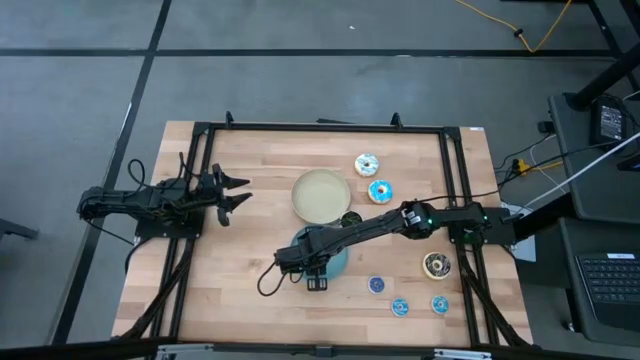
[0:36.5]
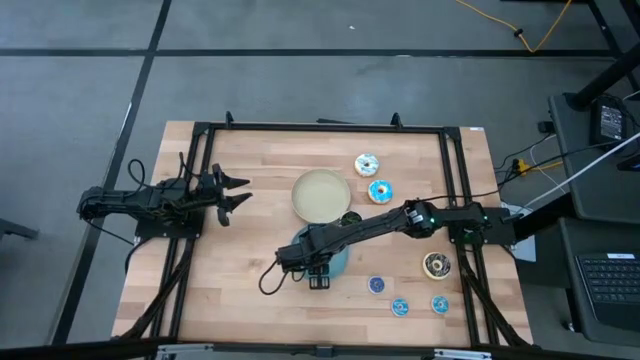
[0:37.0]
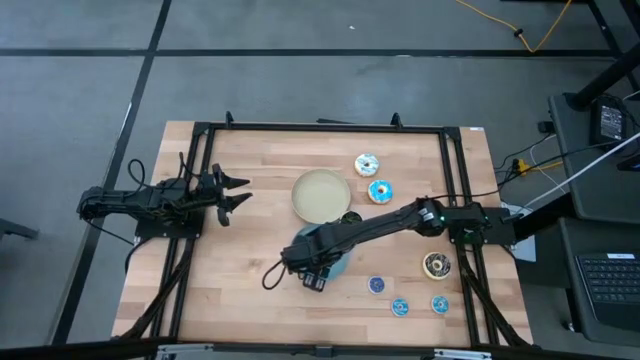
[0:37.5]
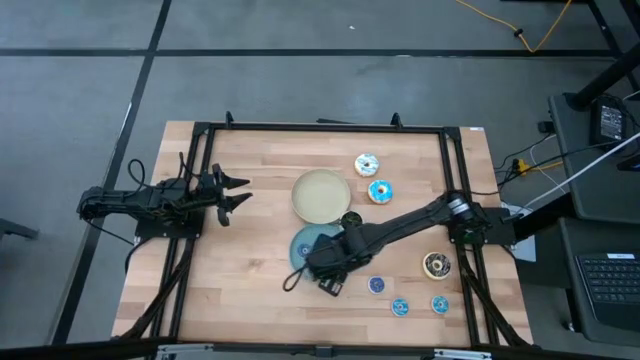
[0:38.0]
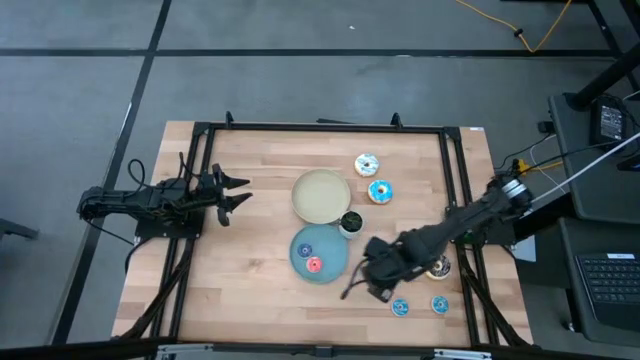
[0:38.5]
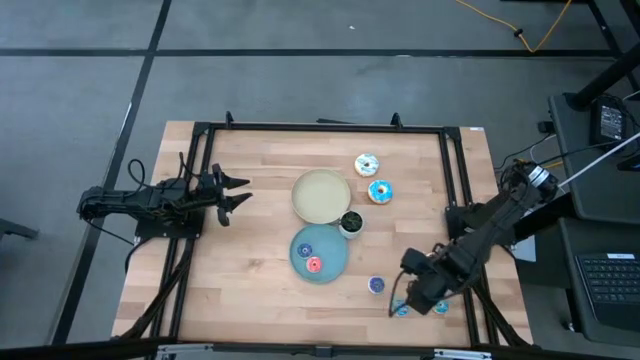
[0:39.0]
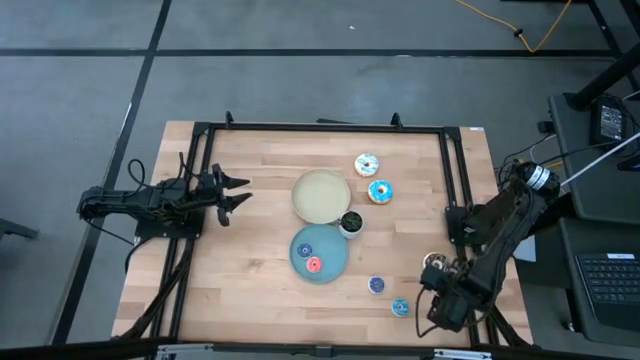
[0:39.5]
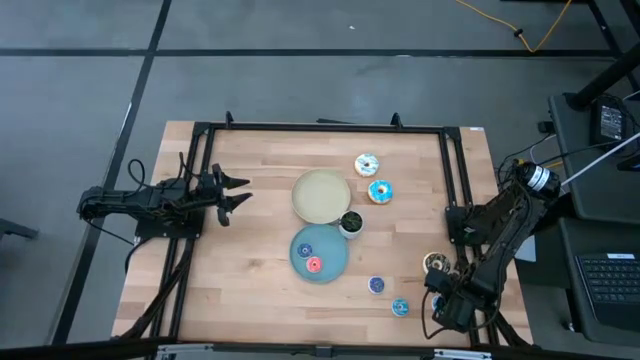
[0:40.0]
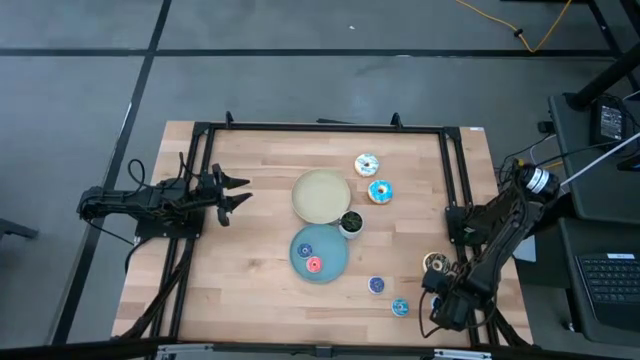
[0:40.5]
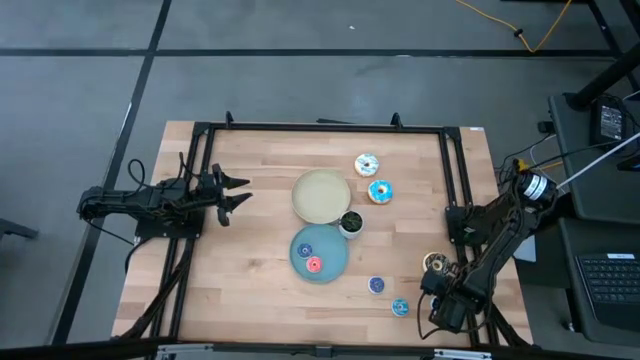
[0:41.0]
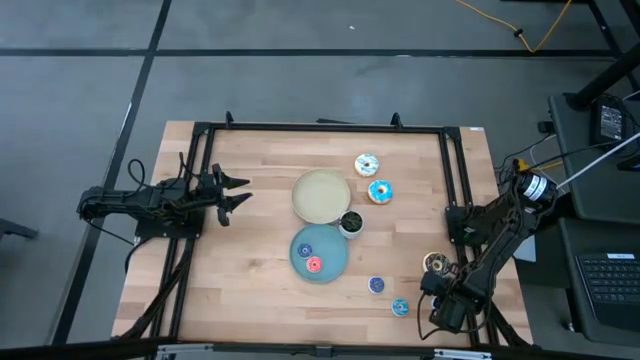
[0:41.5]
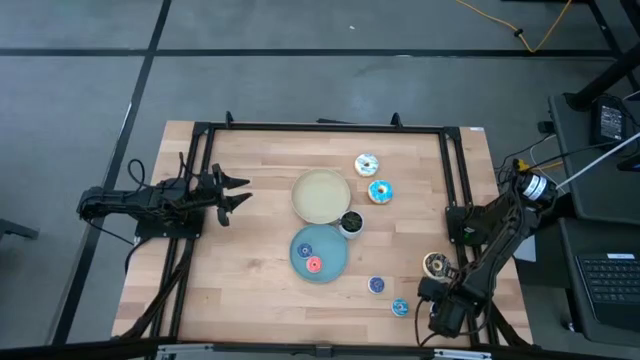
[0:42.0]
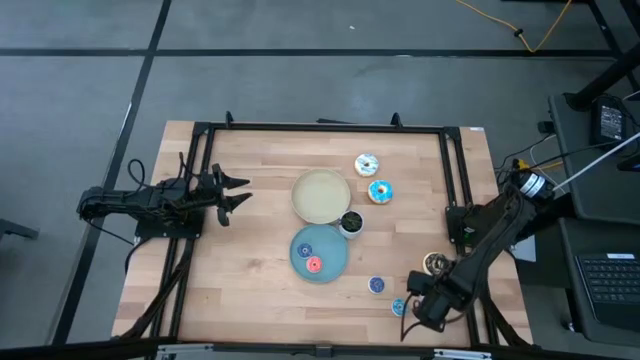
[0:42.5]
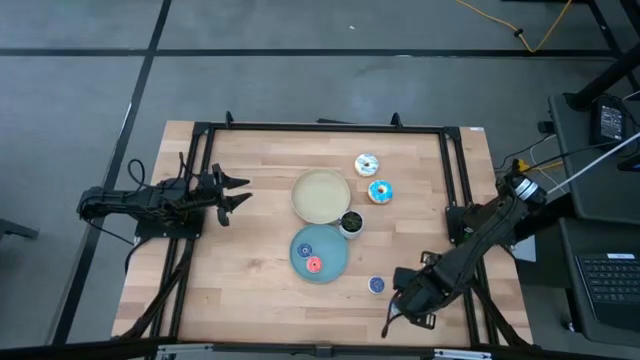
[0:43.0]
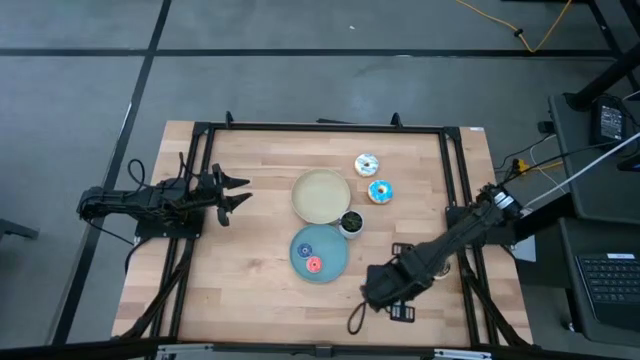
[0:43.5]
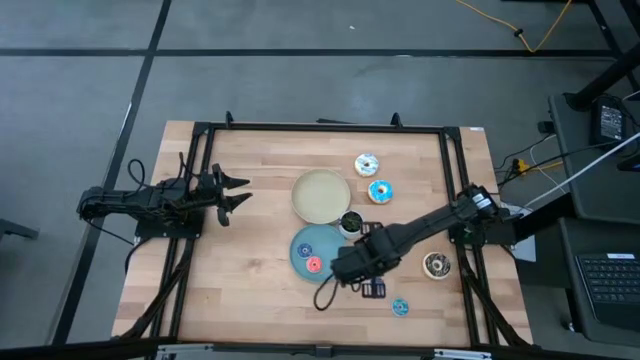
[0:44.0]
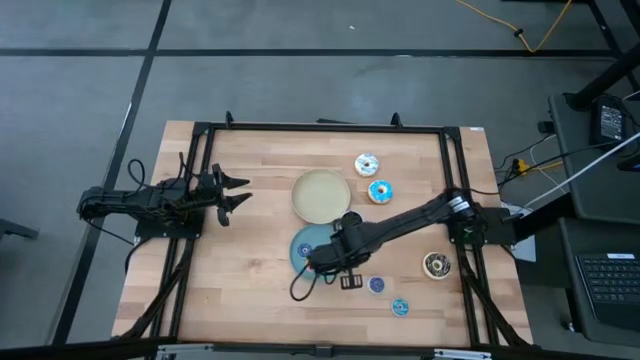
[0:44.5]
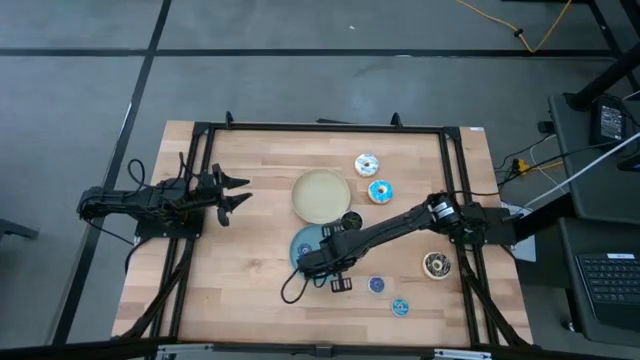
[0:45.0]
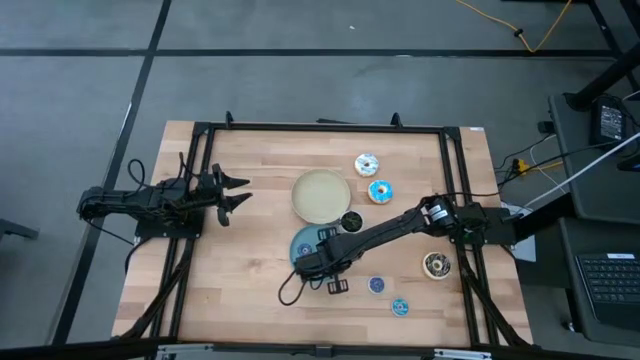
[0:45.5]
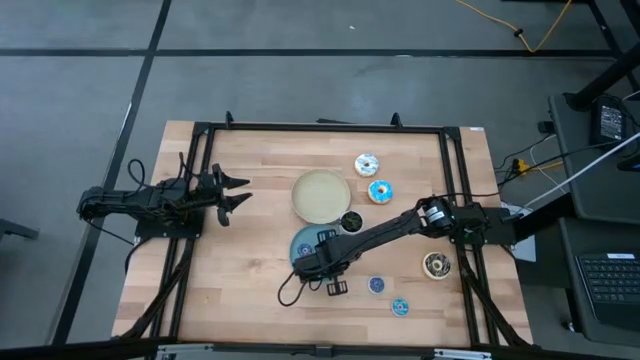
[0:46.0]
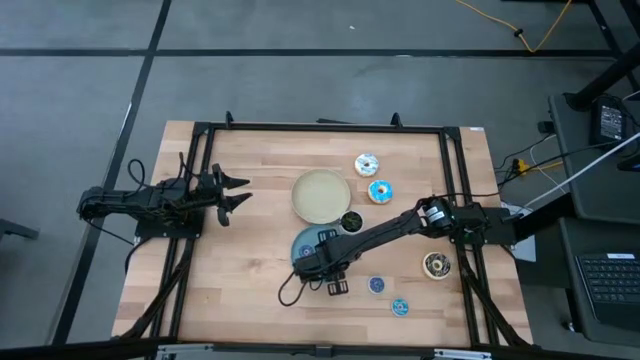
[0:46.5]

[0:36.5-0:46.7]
Task: Pick & Place donuts
Put the small light blue donut on the blue plate

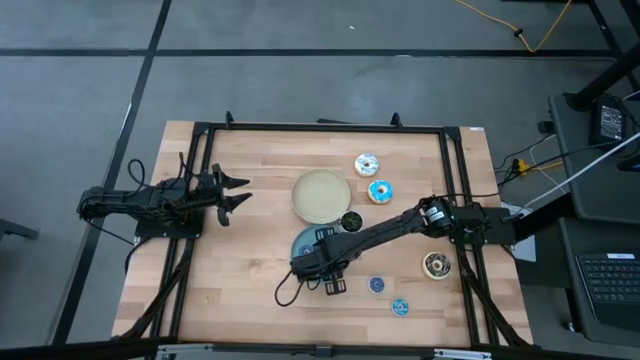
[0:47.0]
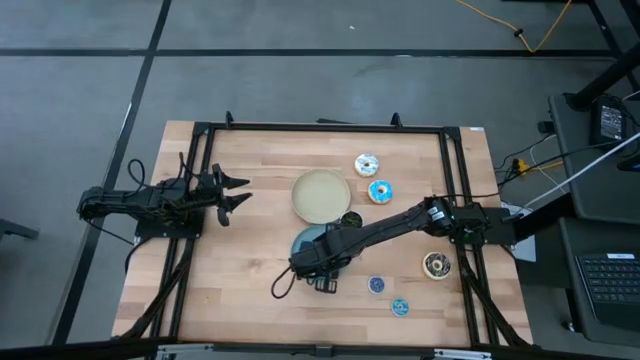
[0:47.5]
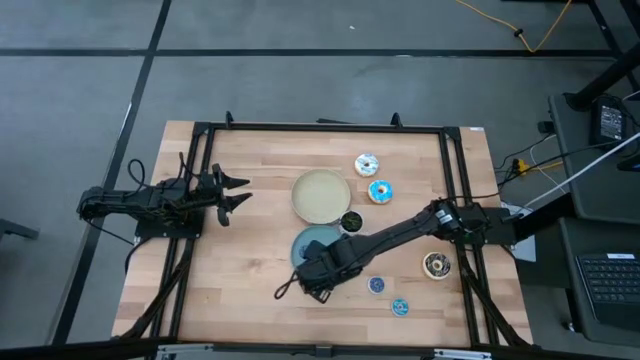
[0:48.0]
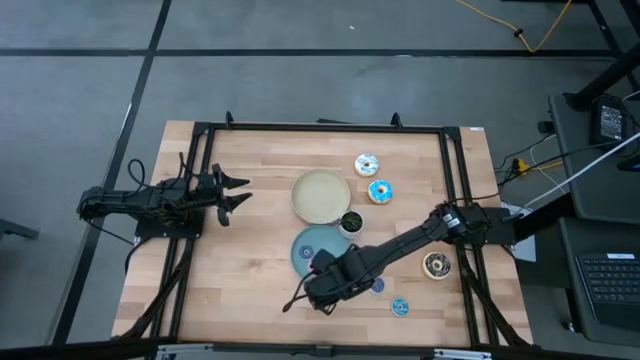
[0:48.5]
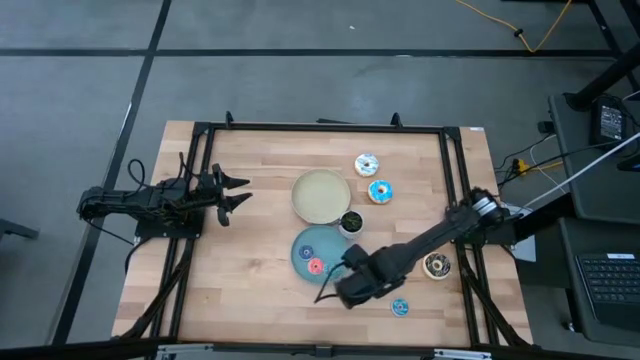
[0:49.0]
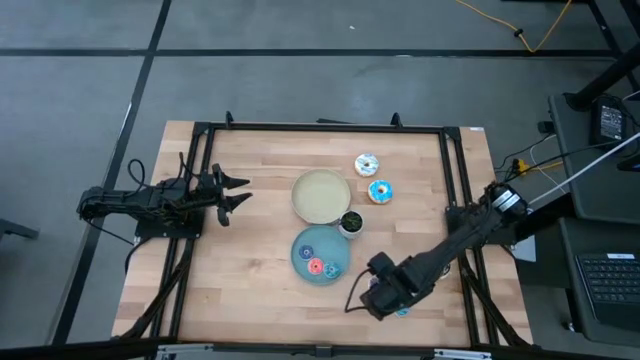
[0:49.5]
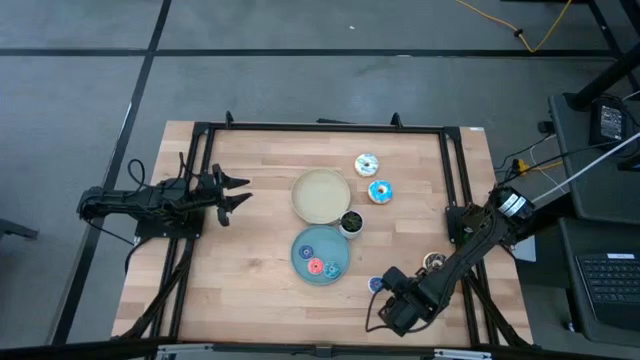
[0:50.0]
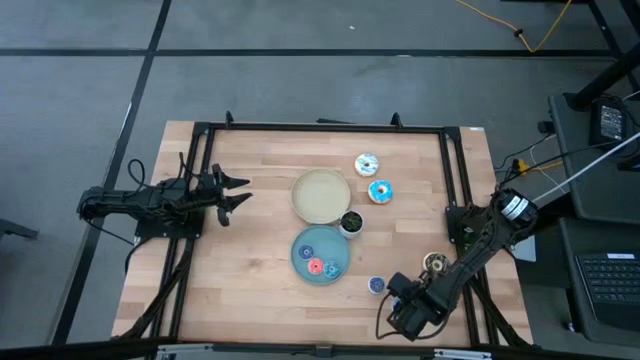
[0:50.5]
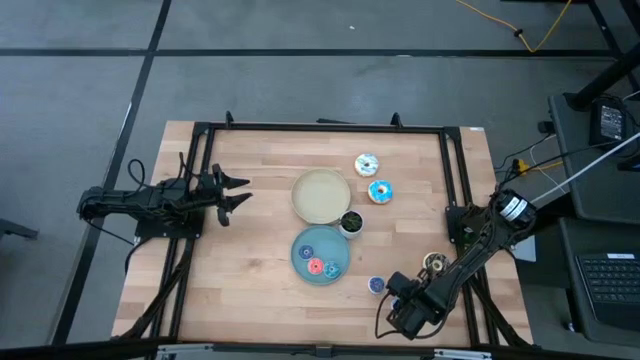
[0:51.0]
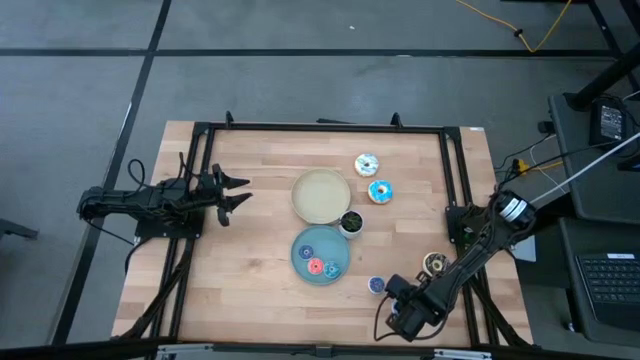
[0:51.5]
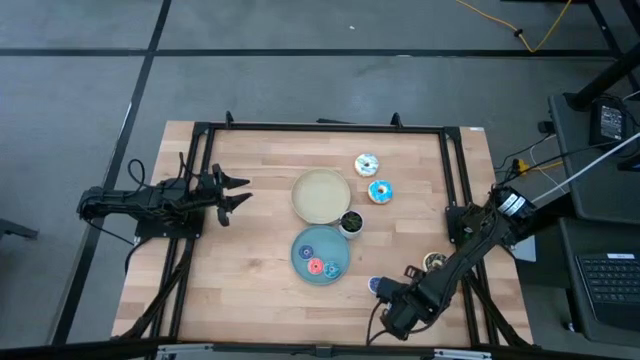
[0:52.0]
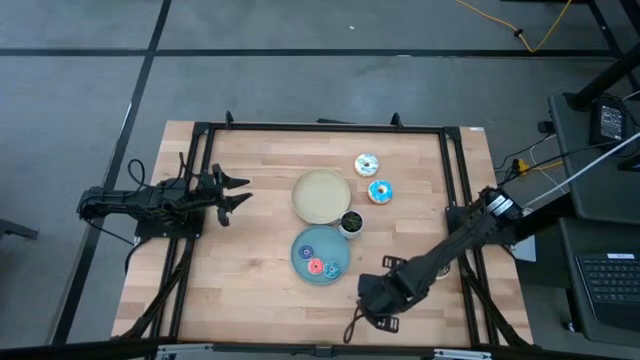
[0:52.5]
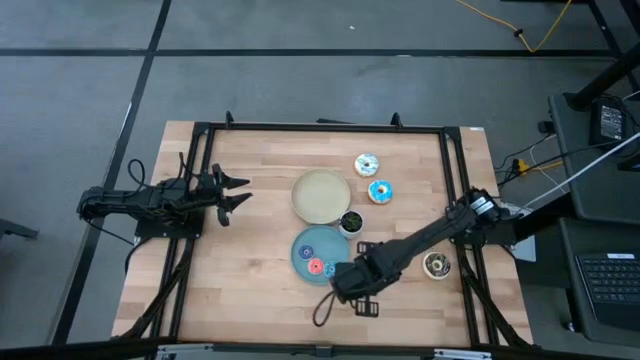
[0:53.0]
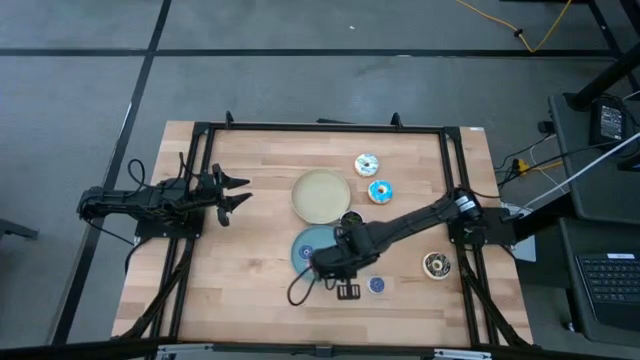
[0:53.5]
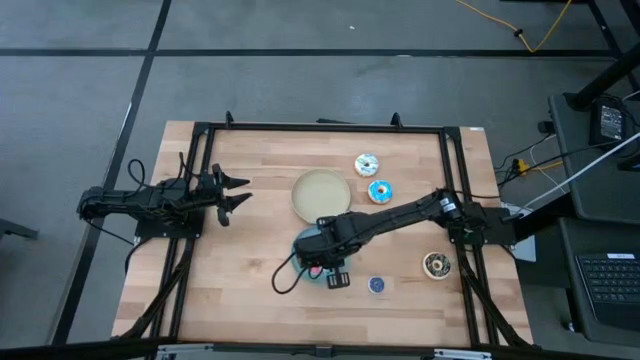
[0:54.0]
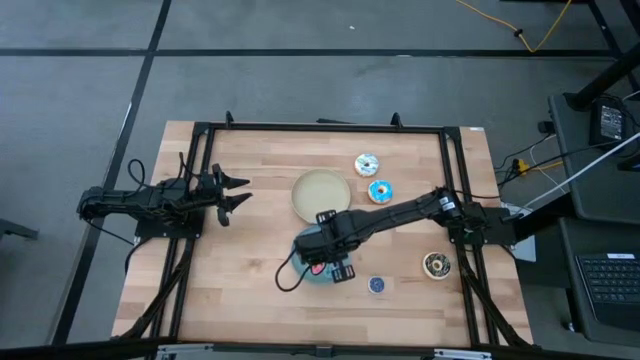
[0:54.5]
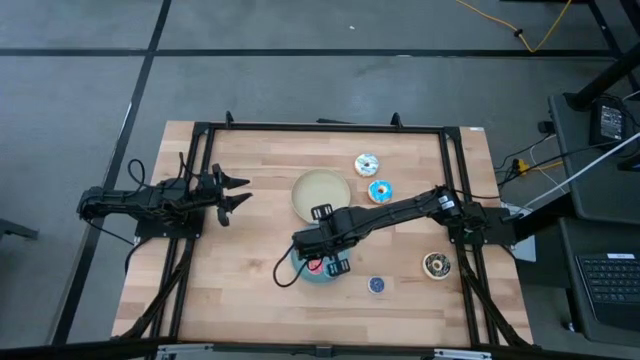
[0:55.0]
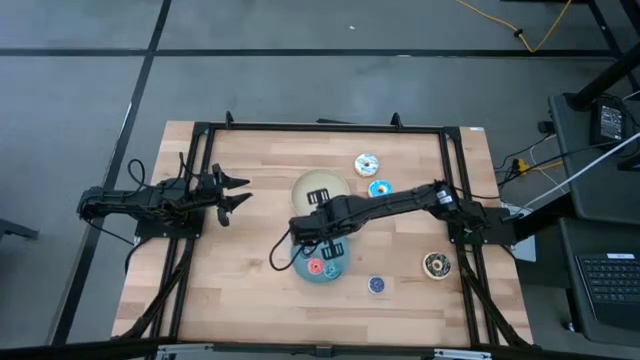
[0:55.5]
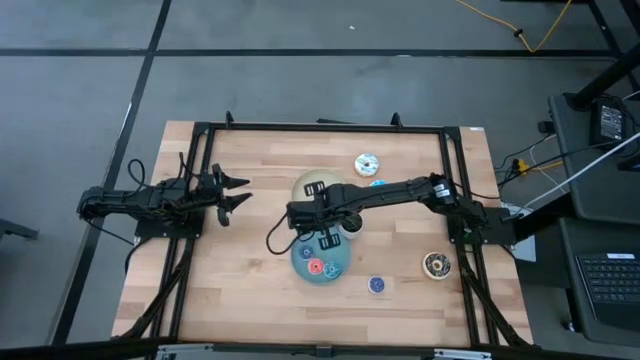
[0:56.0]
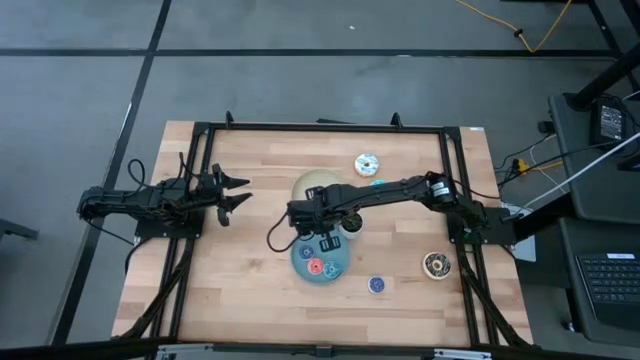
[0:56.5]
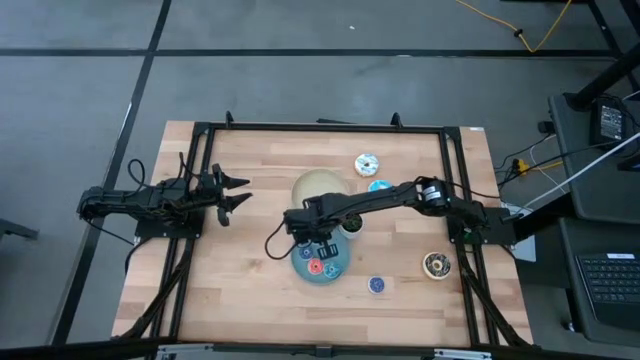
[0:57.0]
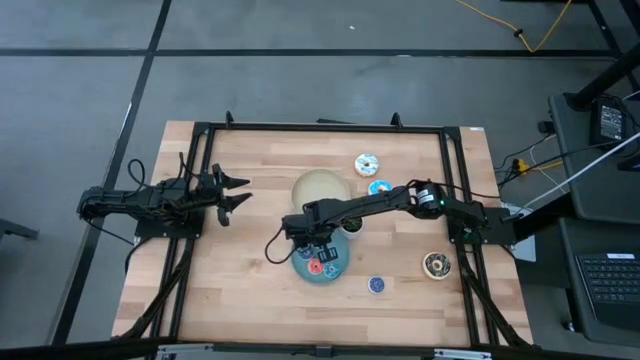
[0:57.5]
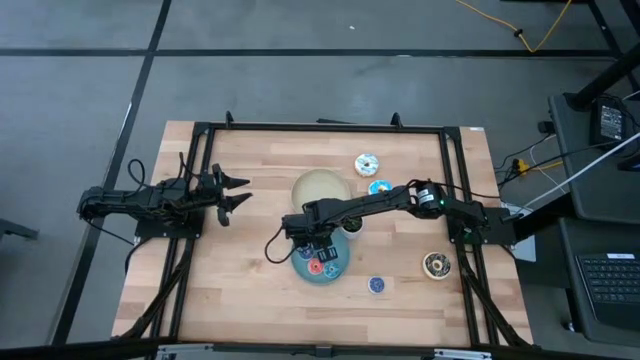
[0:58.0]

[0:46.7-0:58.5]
Put the small light blue donut on the blue plate

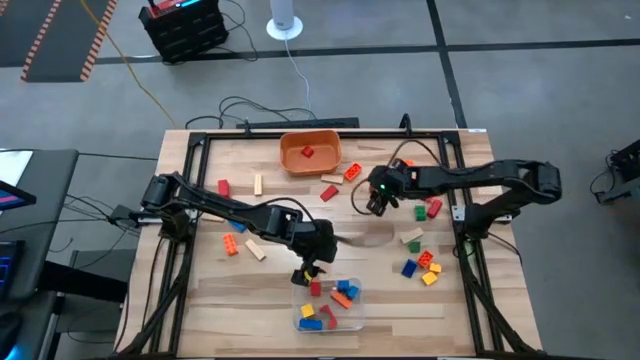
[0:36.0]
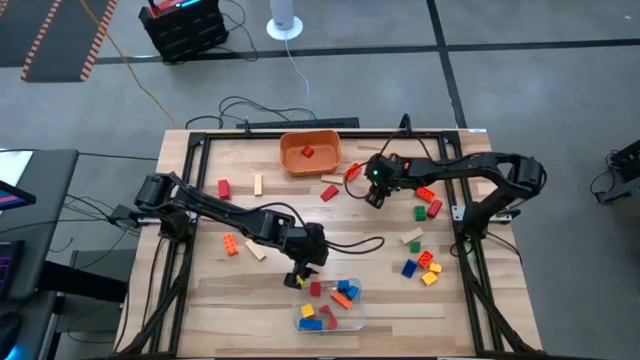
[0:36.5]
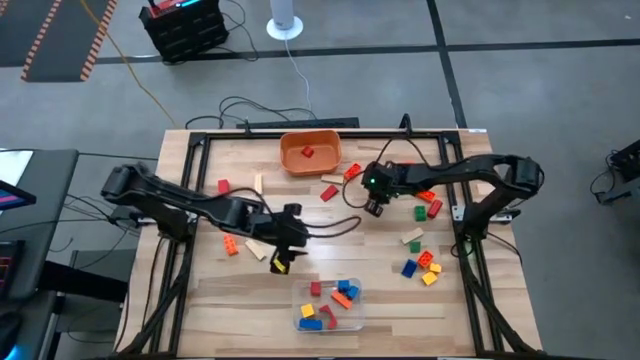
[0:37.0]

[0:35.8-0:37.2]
Task: Sort blocks by size
Put the small red wooden block into the orange bin
